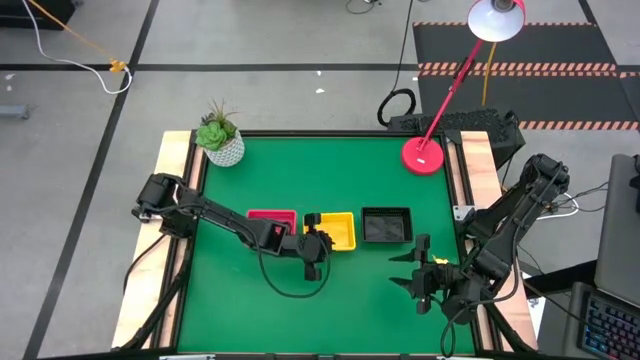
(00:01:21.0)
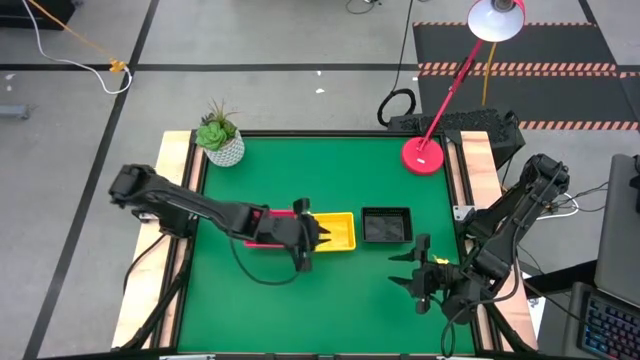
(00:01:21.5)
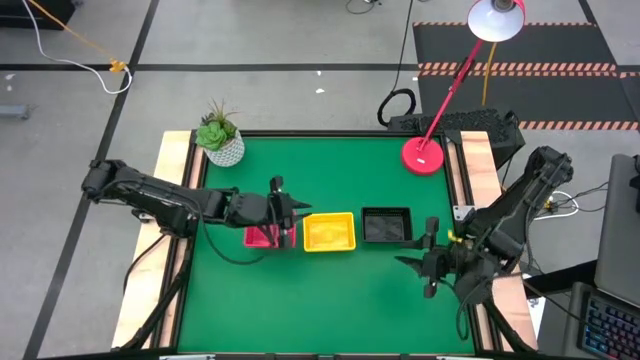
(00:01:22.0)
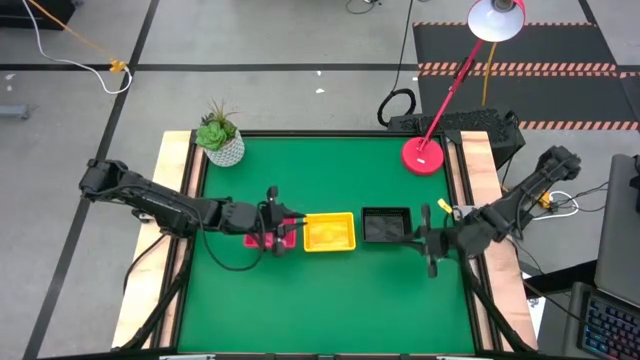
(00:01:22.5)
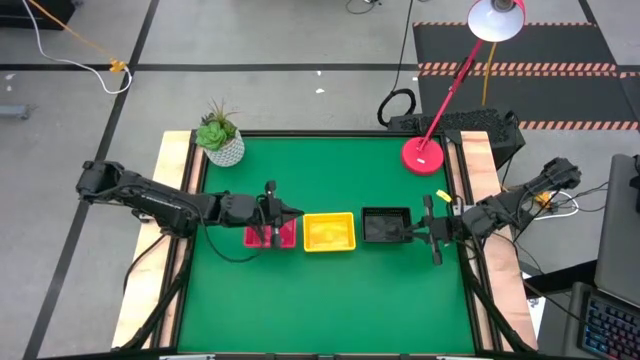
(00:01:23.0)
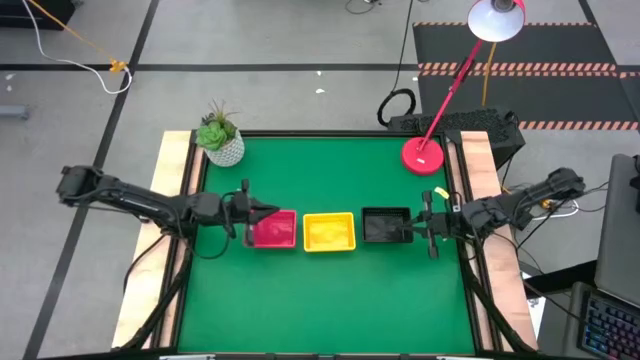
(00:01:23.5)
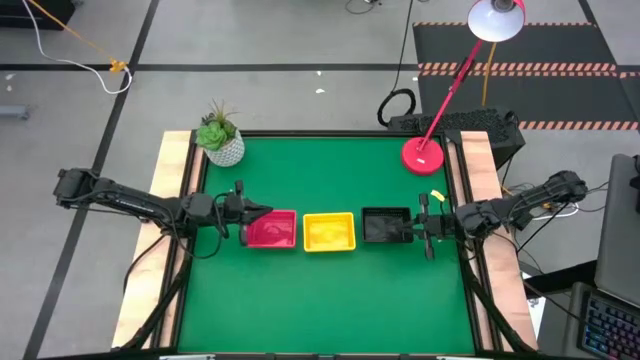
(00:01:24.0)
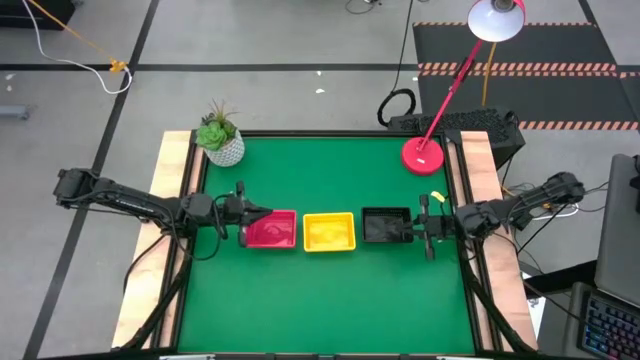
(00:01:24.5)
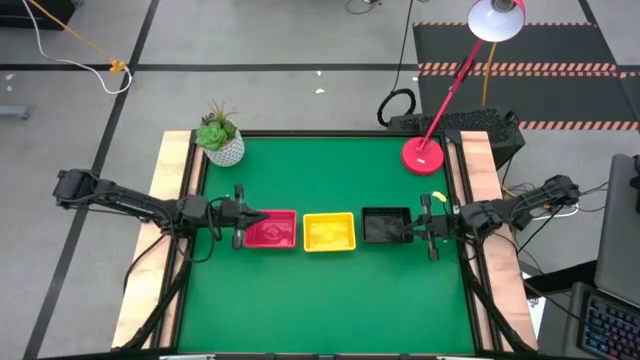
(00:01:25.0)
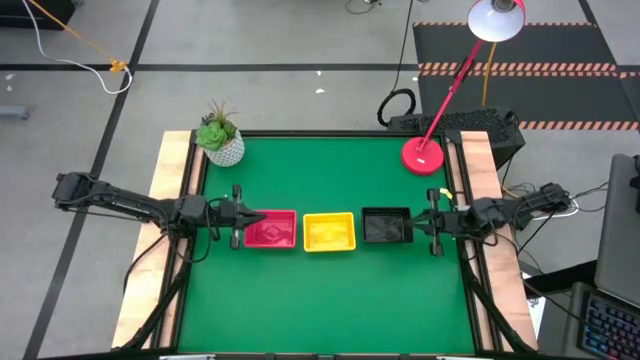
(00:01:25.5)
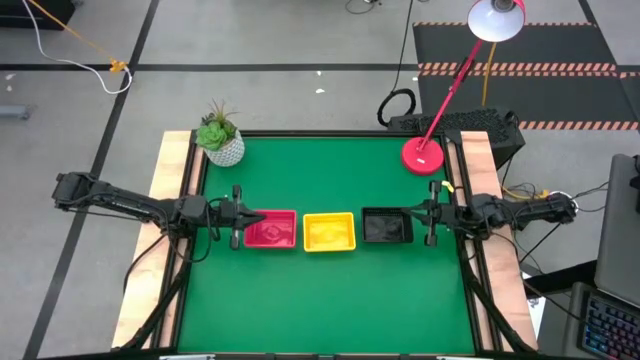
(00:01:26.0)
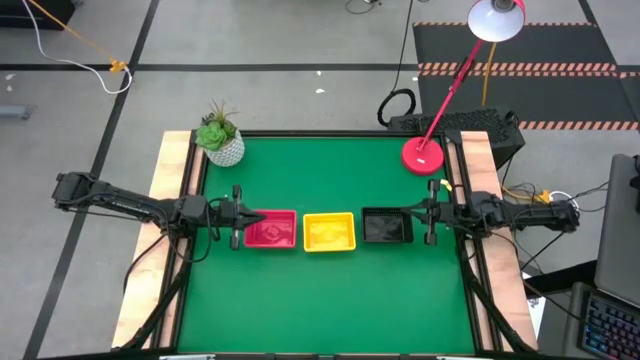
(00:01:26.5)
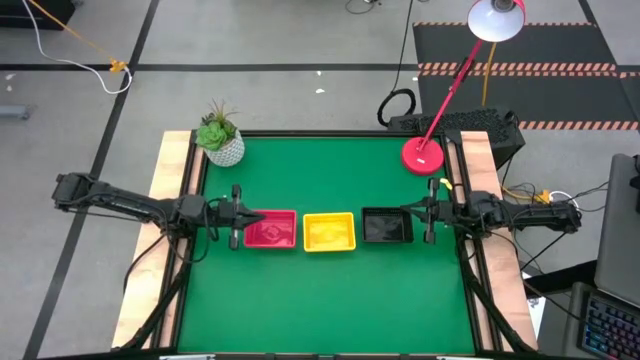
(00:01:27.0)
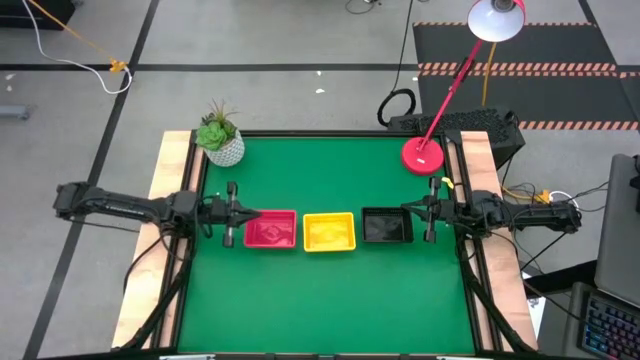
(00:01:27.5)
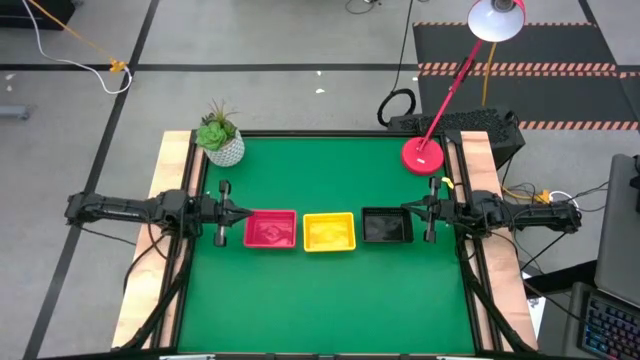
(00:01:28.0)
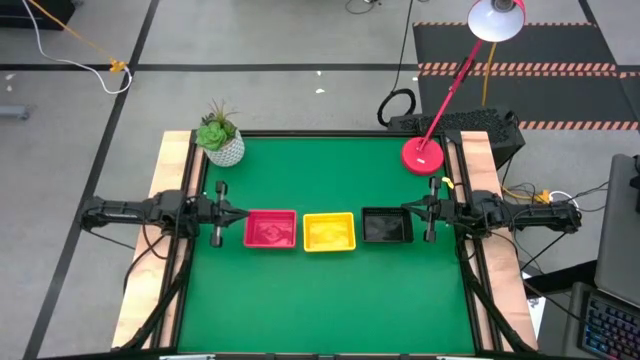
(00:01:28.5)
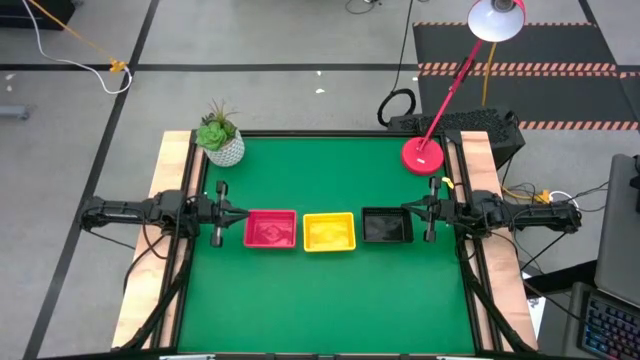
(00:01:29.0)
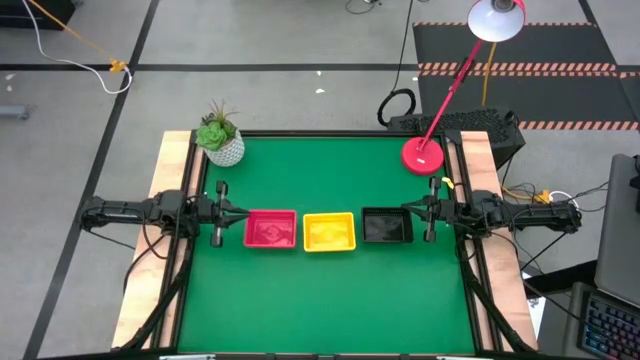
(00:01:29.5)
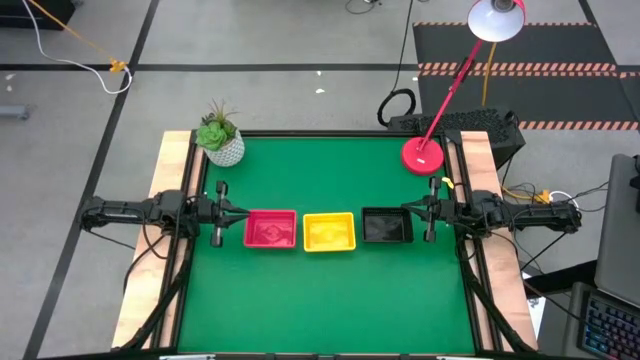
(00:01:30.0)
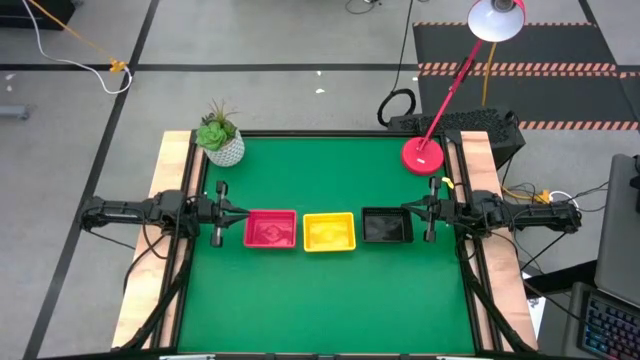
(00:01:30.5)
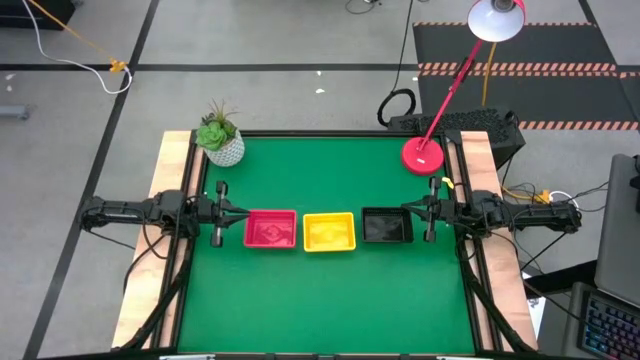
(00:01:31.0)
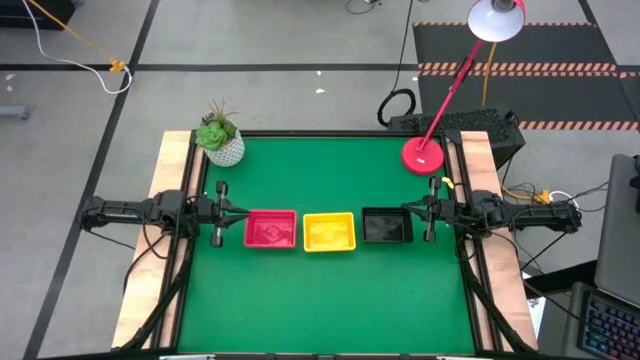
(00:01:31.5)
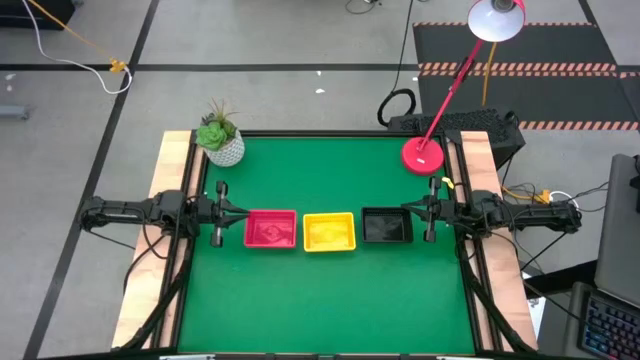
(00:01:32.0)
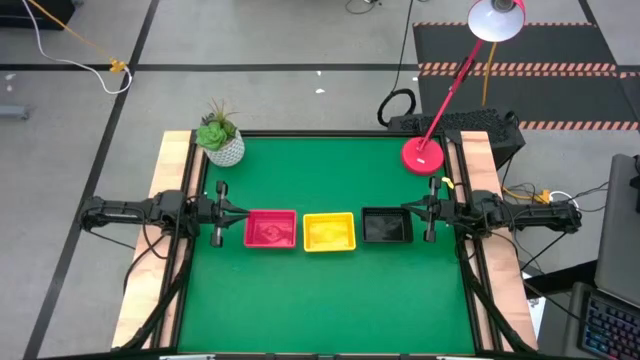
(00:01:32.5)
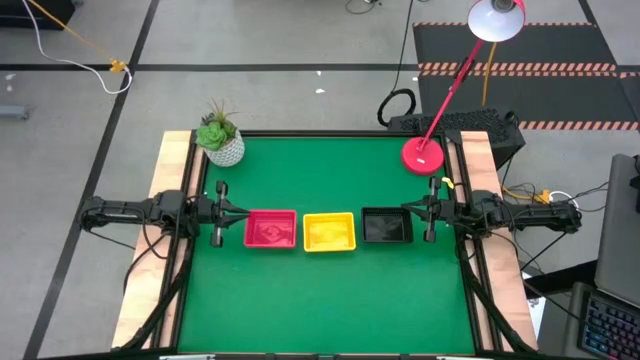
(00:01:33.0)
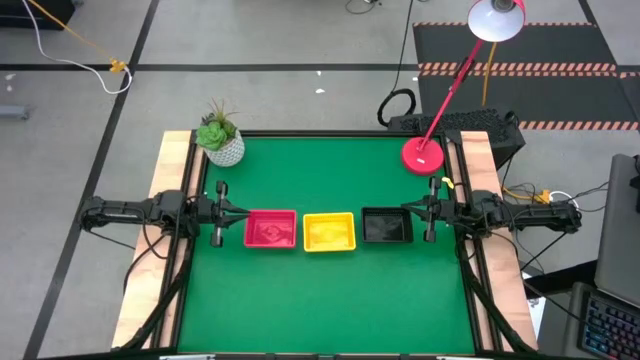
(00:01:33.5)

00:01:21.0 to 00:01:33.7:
Return to Home Position

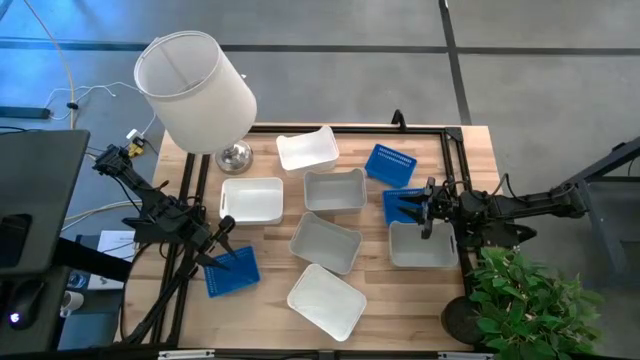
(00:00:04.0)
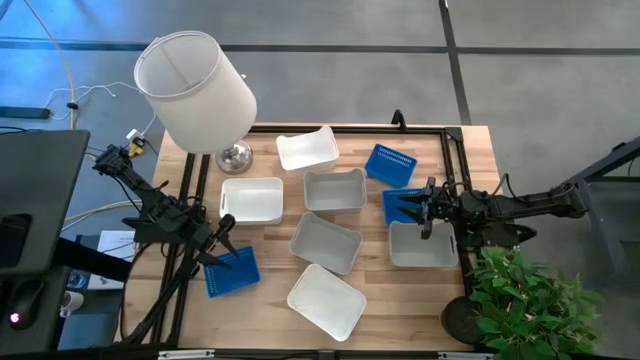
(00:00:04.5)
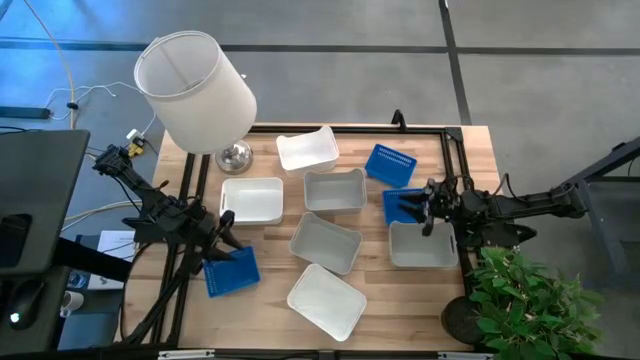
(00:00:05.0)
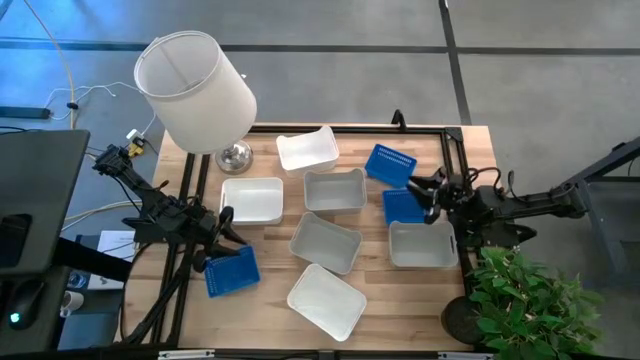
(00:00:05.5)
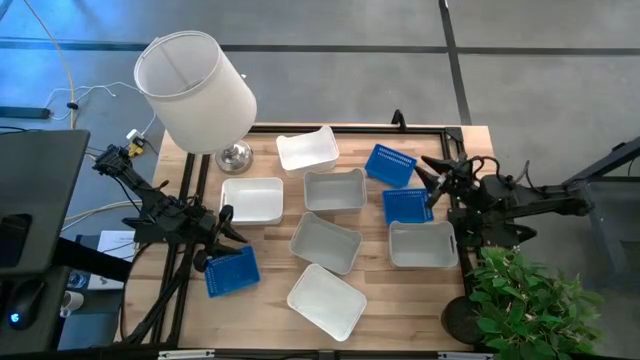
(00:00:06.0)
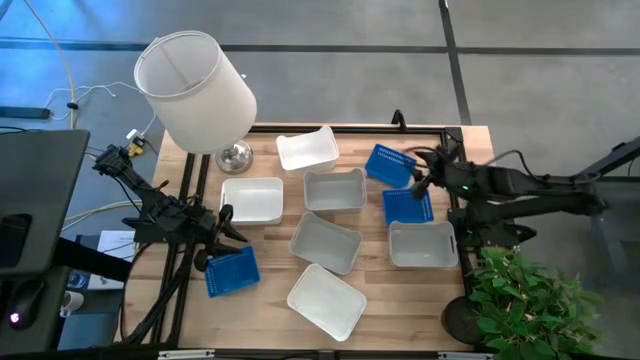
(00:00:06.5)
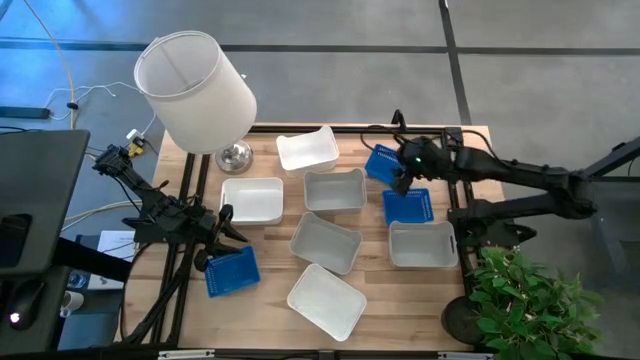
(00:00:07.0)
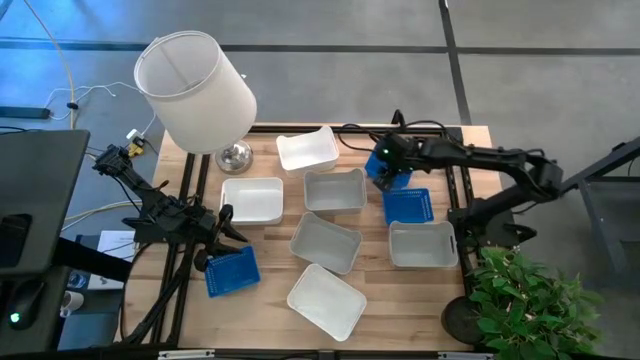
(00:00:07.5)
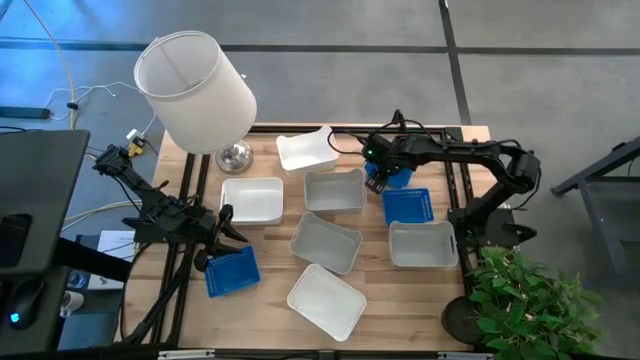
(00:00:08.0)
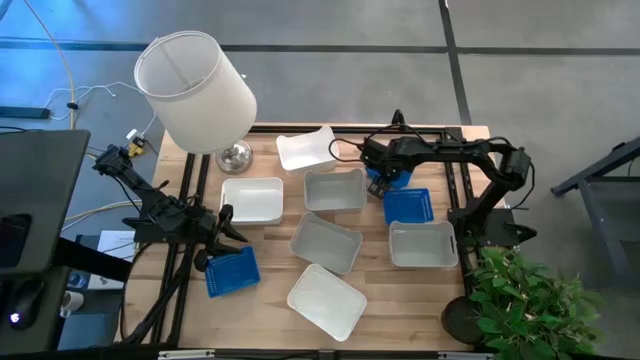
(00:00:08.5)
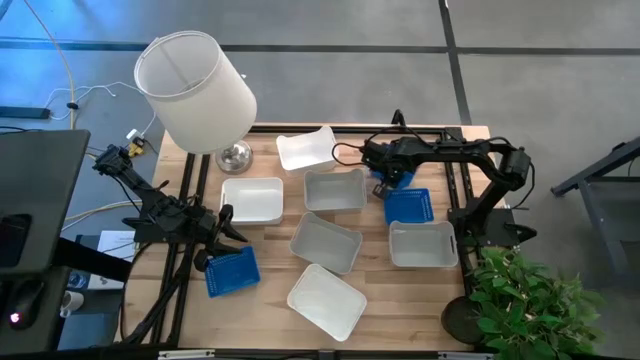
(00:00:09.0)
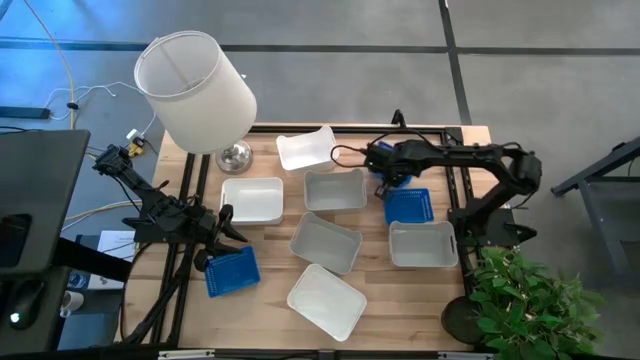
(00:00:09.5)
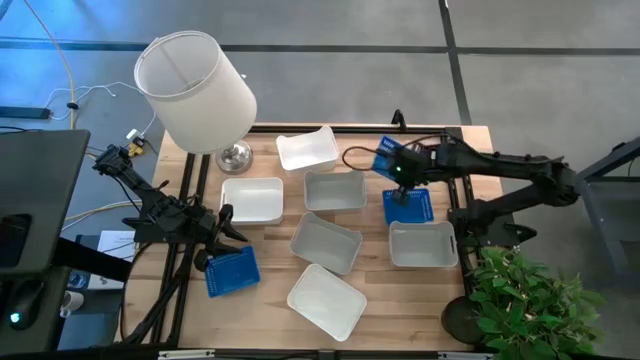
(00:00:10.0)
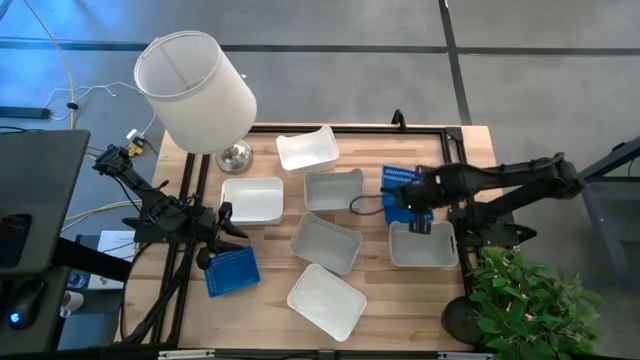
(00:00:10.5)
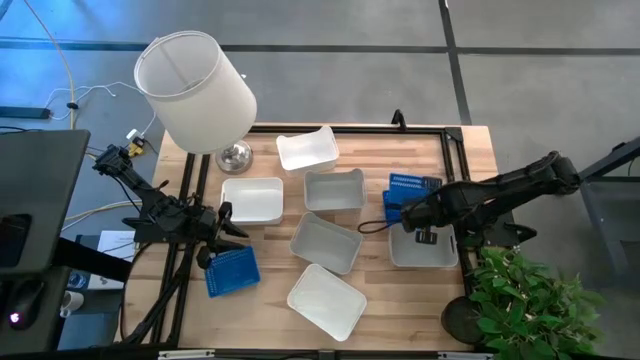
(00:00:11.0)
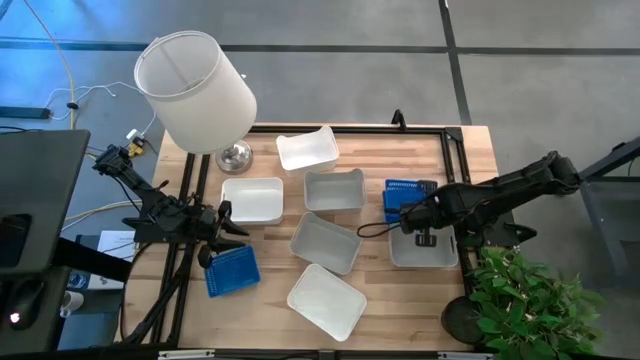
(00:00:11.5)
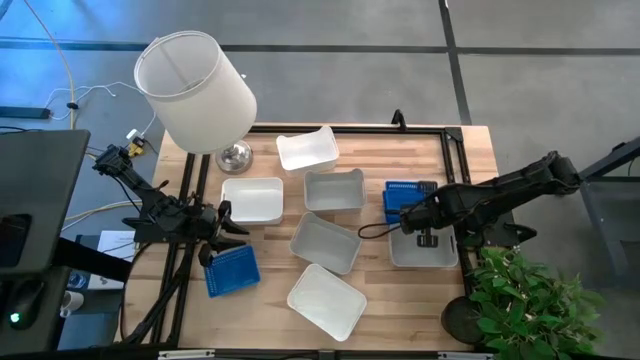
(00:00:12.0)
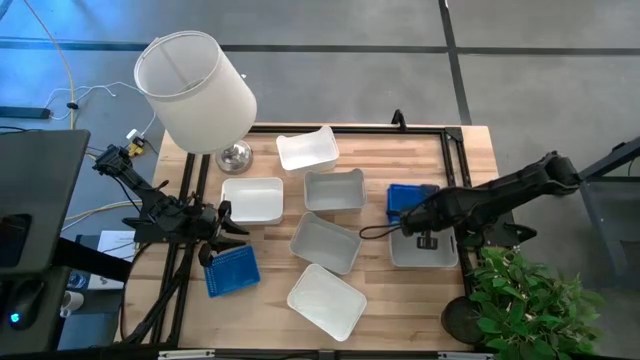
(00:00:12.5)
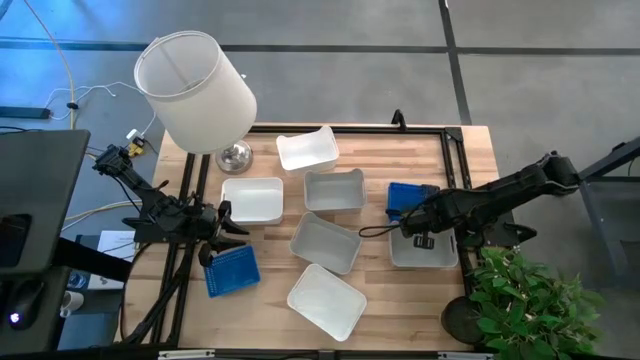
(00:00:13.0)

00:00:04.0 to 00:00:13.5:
Stack the top blue bin into the middle blue bin
